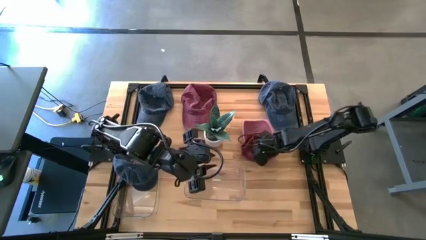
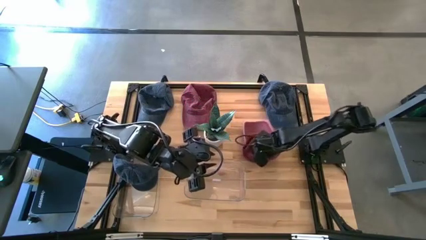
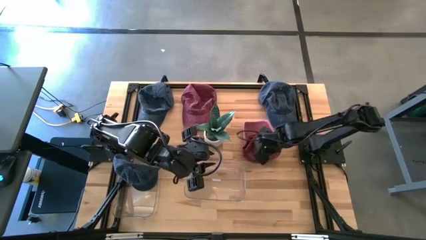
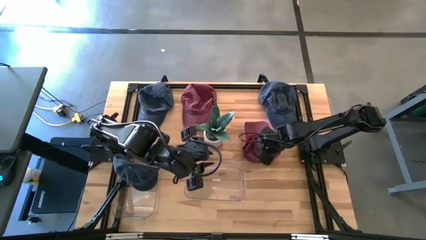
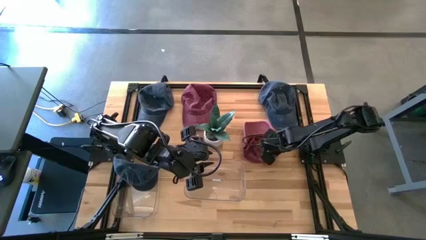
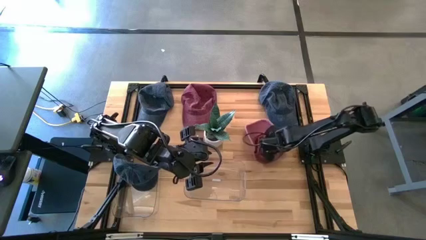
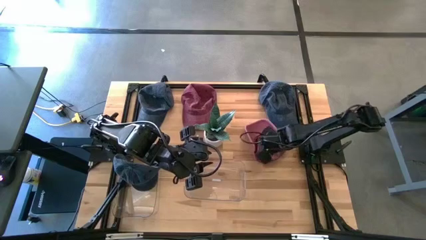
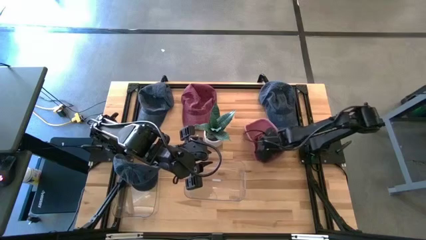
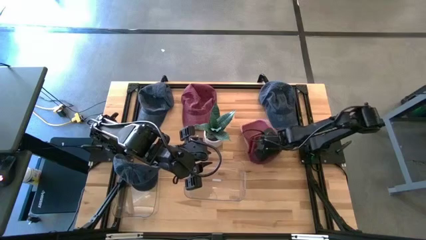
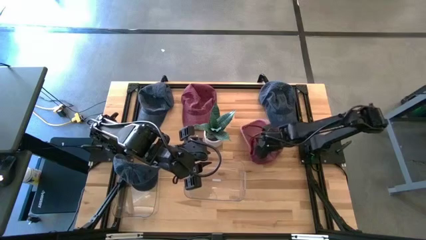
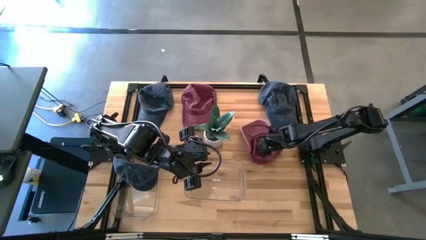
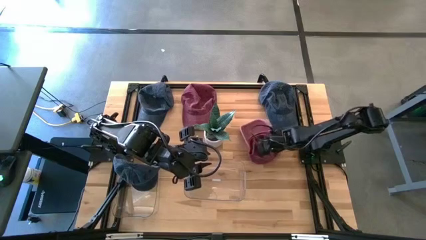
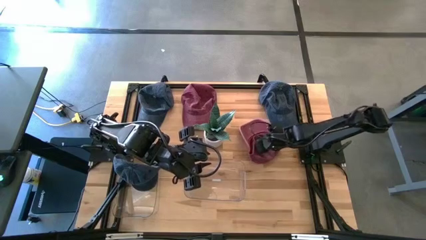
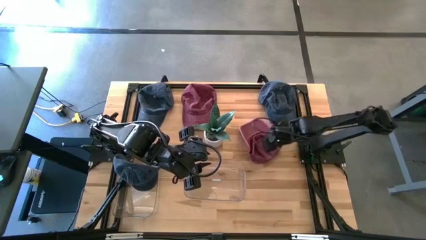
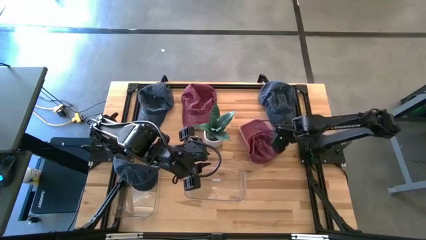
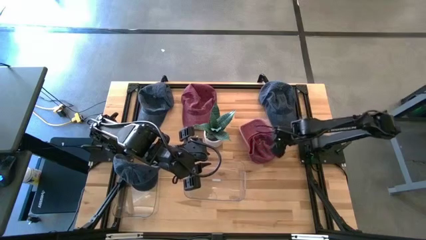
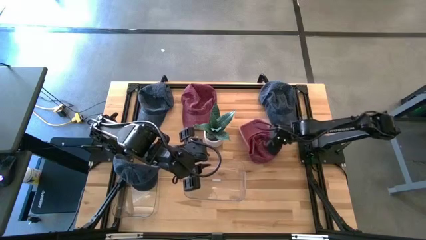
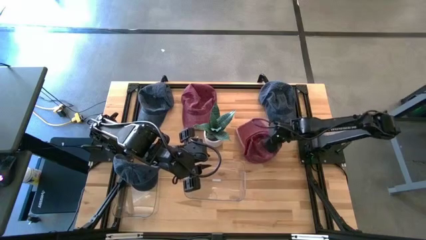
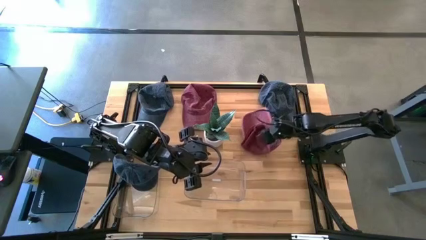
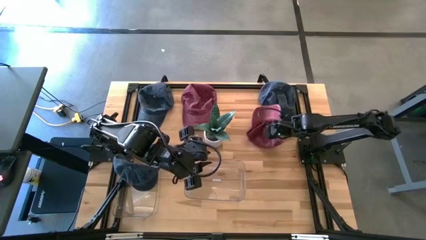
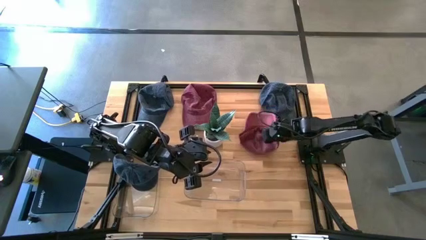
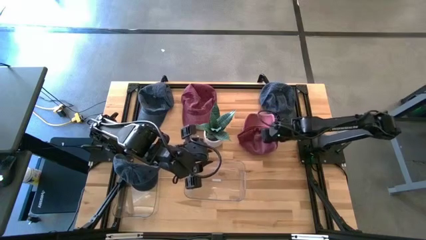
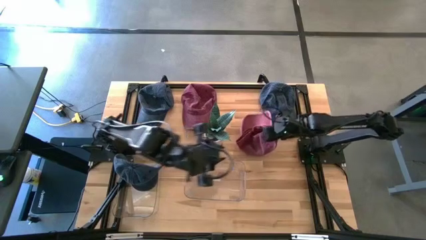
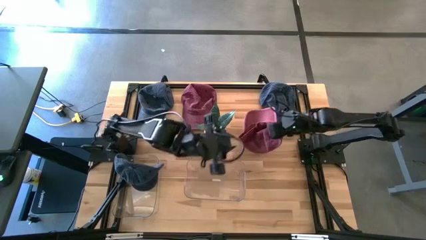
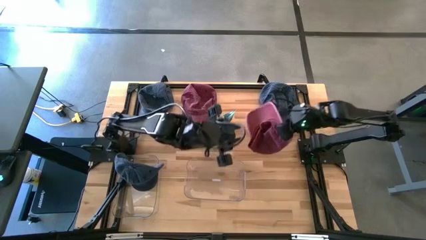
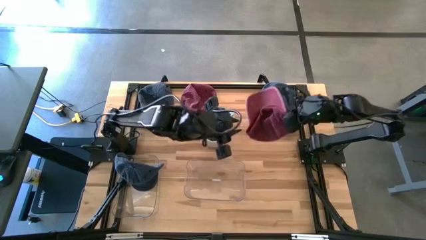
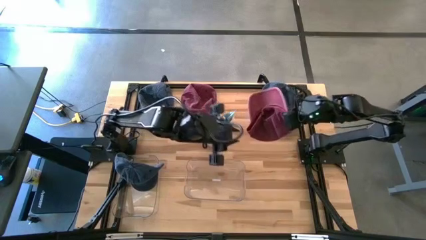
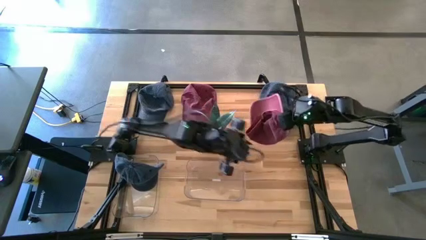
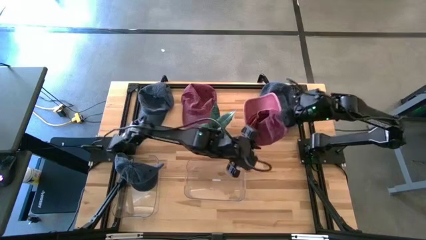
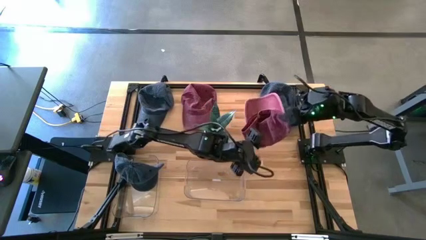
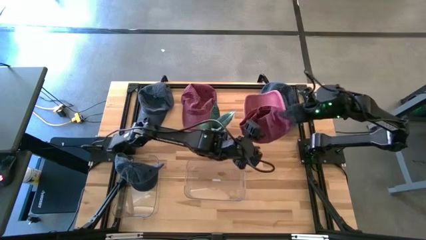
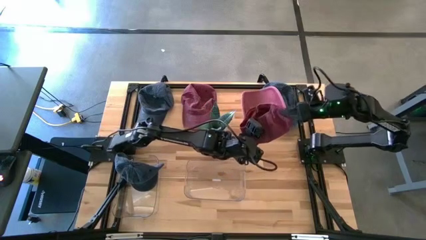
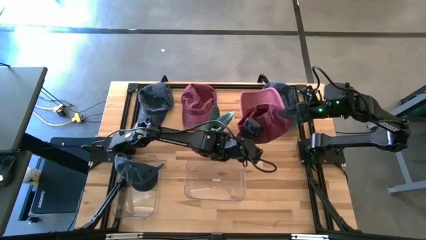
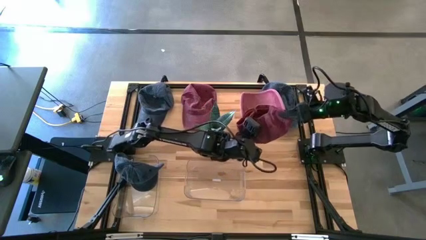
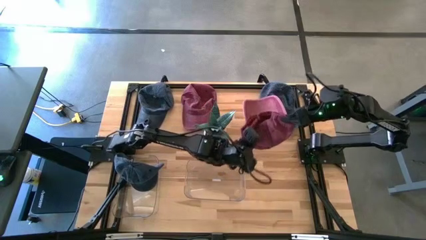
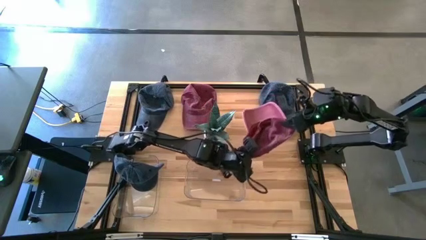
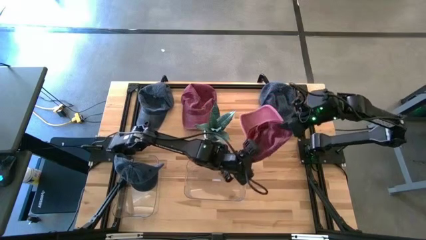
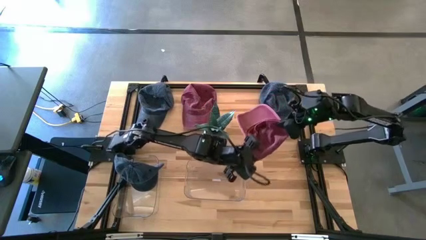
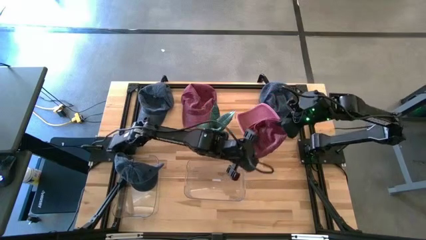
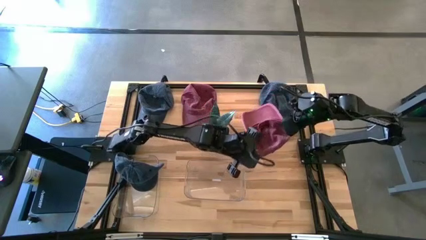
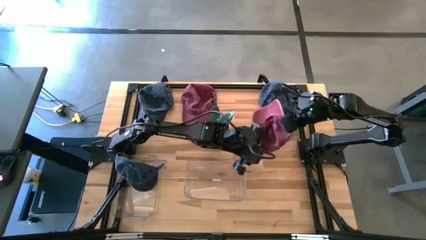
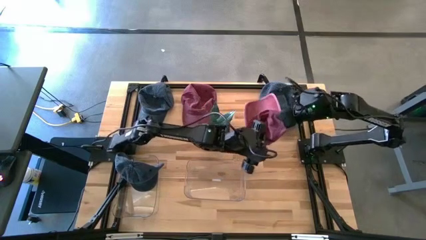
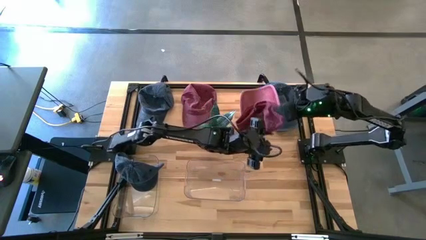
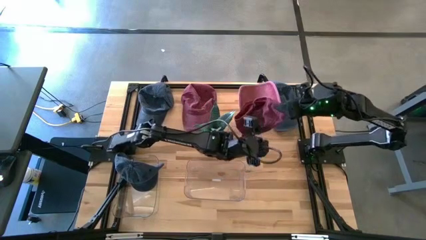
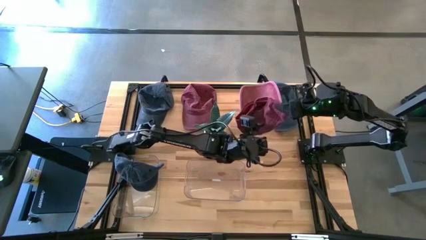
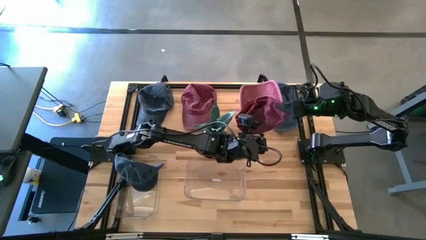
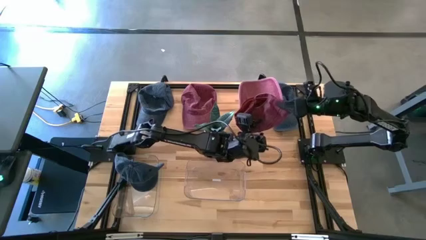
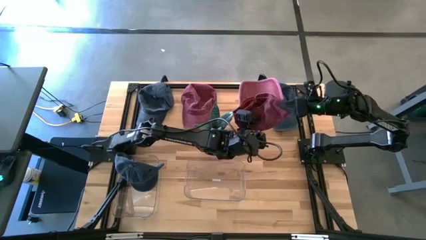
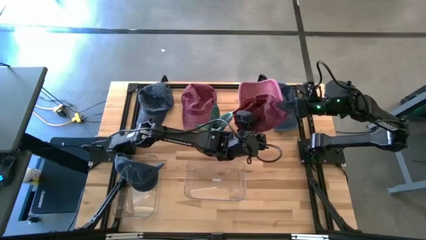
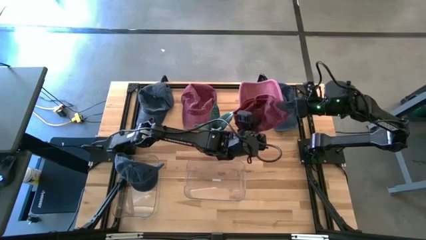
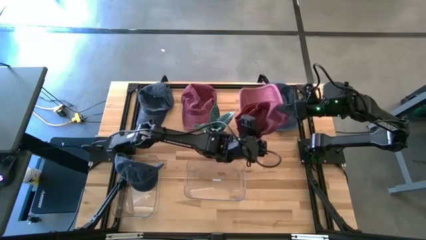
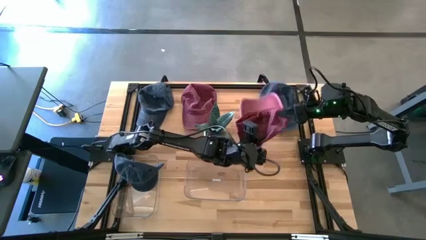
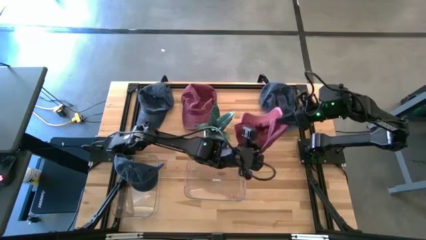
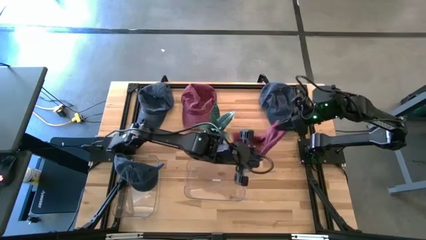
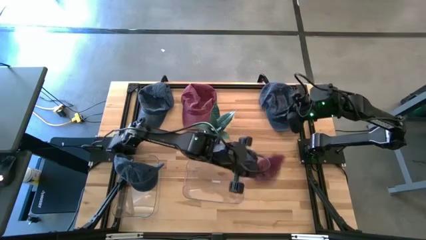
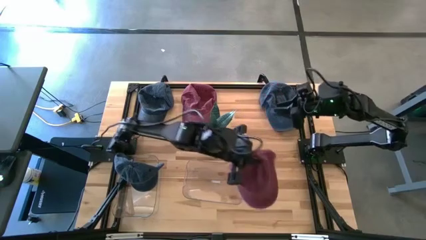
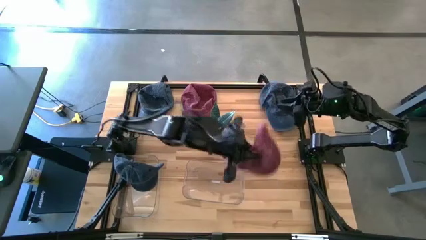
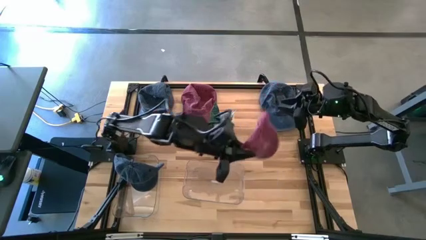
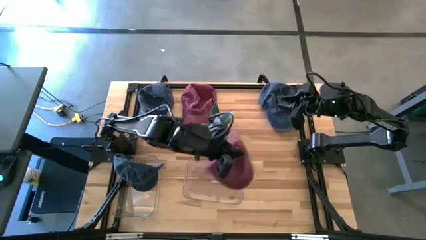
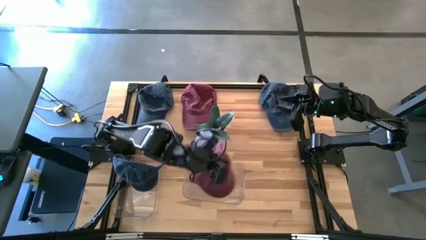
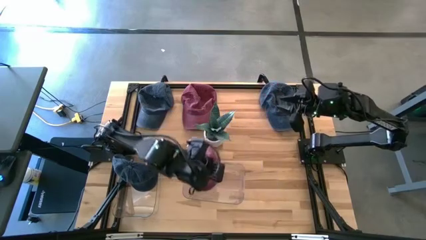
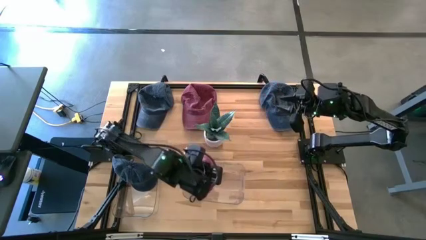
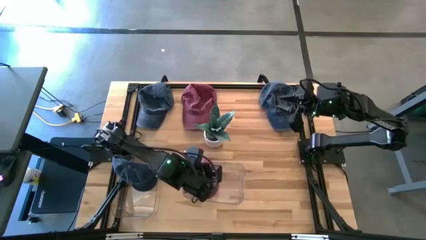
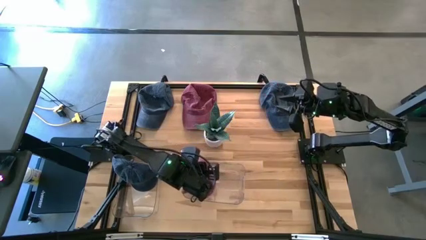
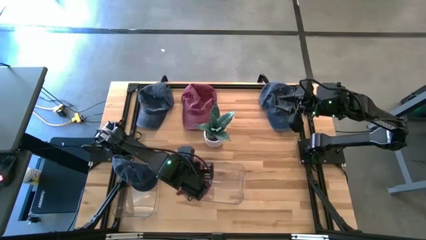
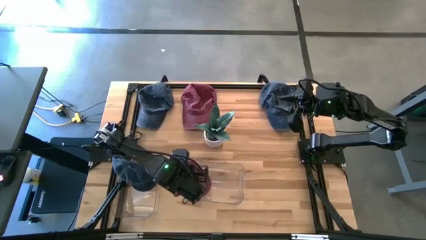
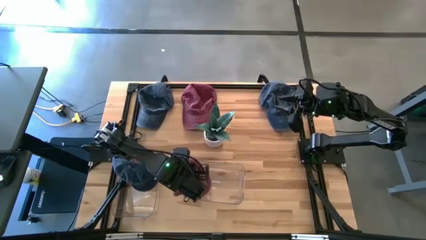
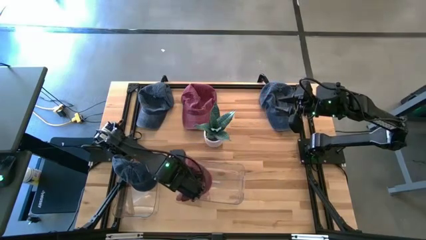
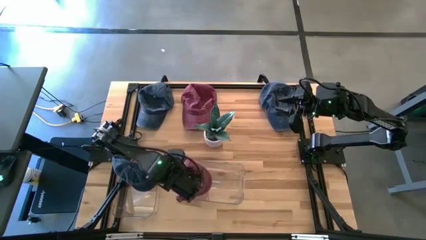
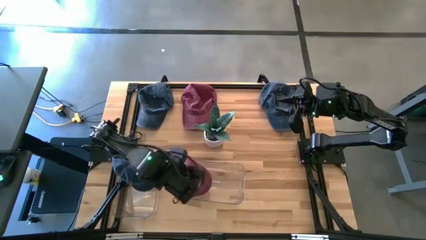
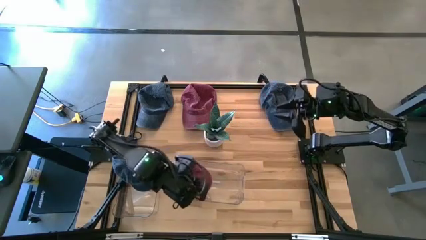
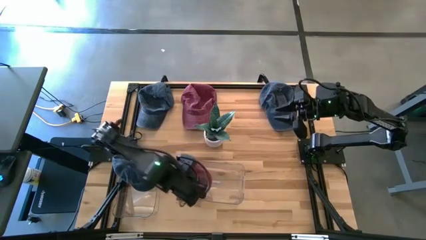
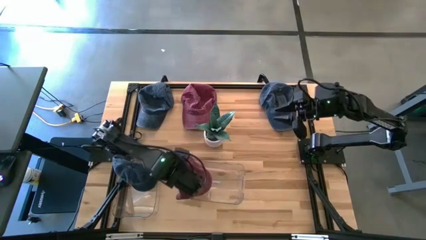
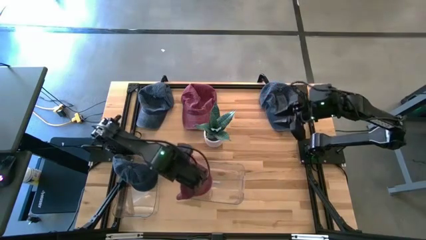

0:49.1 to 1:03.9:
Task: Pick & Place hat
Put the right red cap into the right transparent bin
